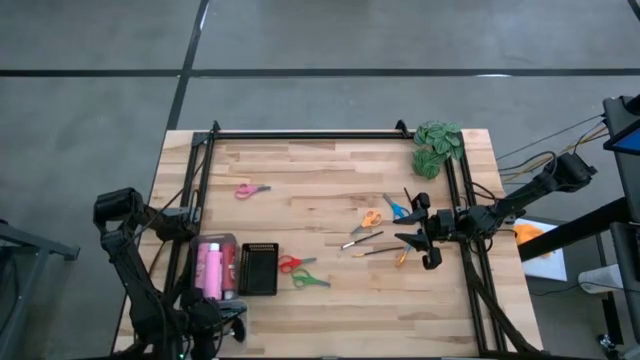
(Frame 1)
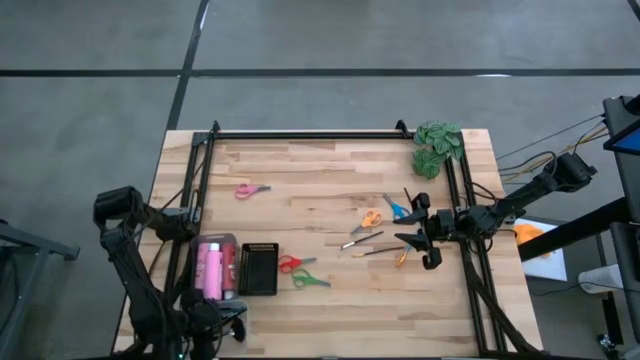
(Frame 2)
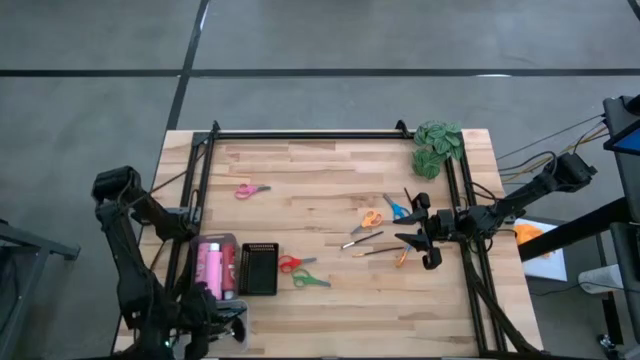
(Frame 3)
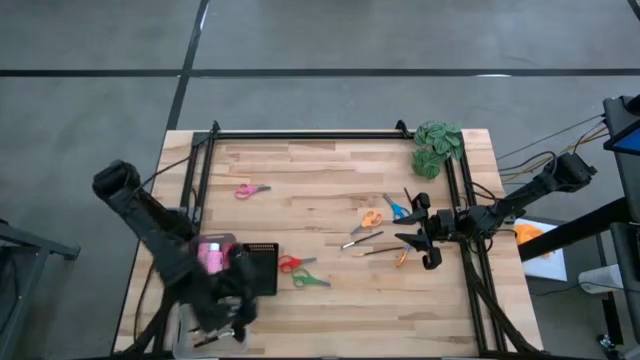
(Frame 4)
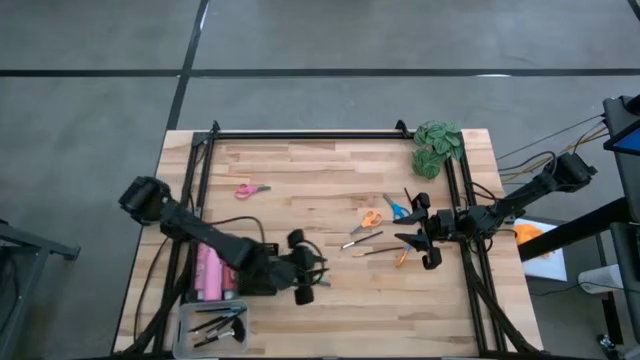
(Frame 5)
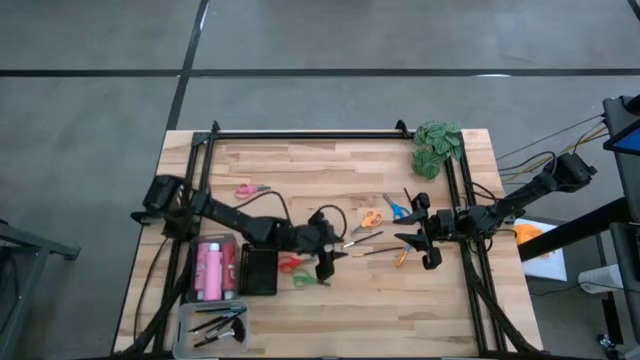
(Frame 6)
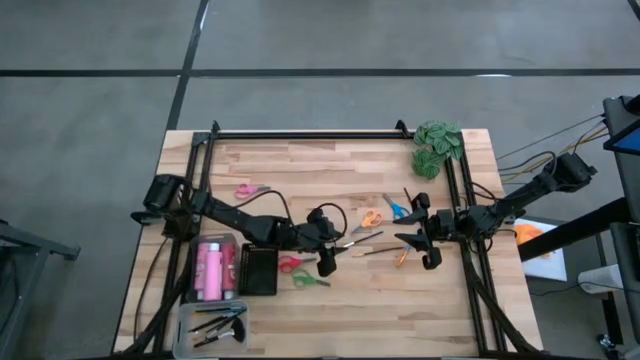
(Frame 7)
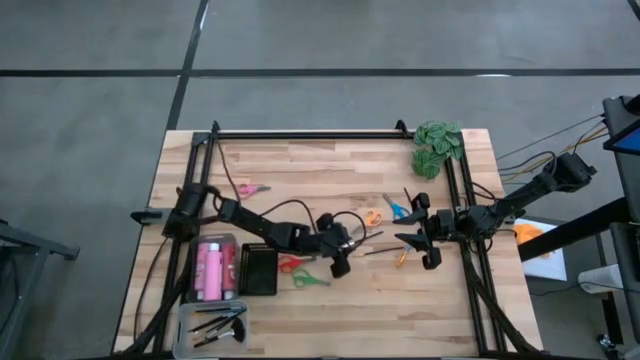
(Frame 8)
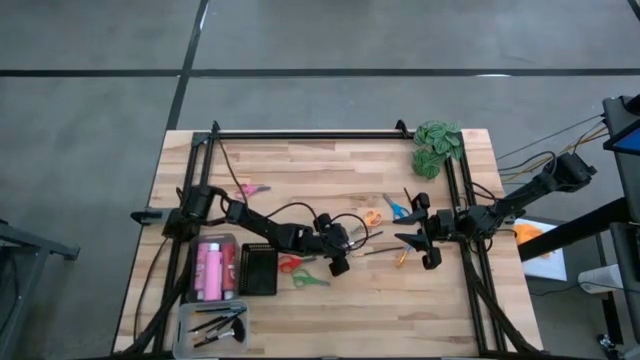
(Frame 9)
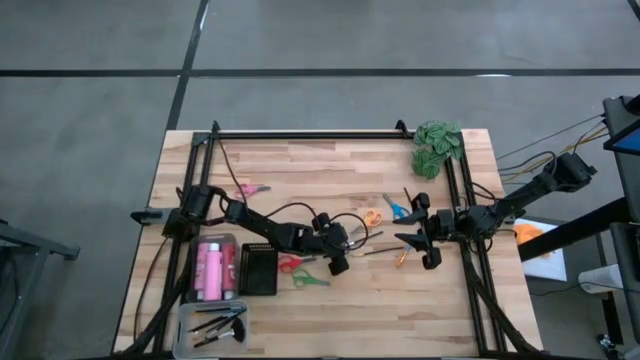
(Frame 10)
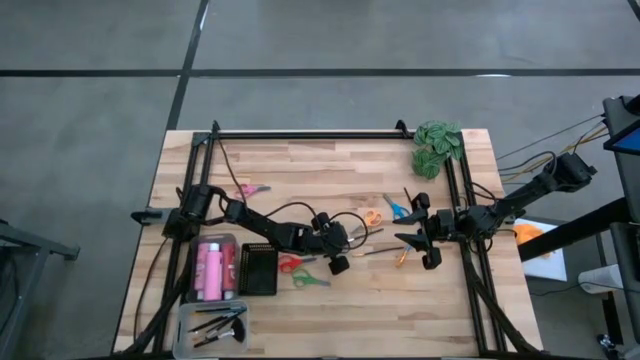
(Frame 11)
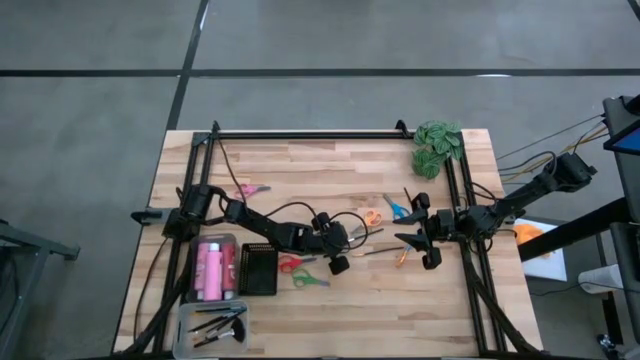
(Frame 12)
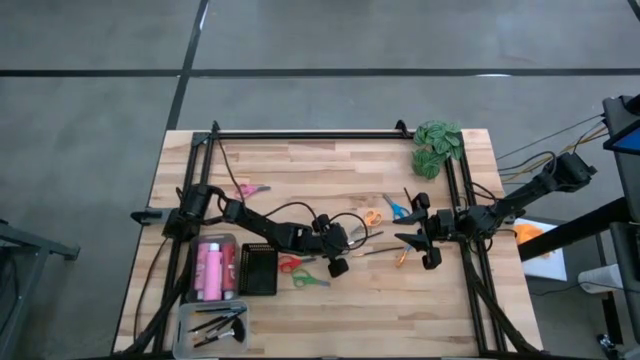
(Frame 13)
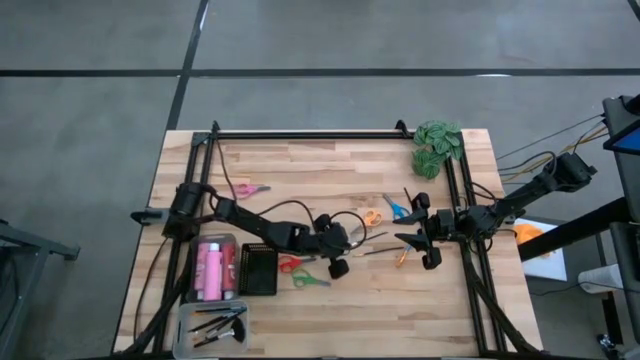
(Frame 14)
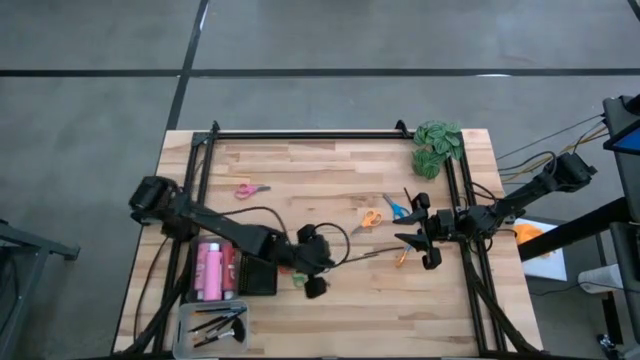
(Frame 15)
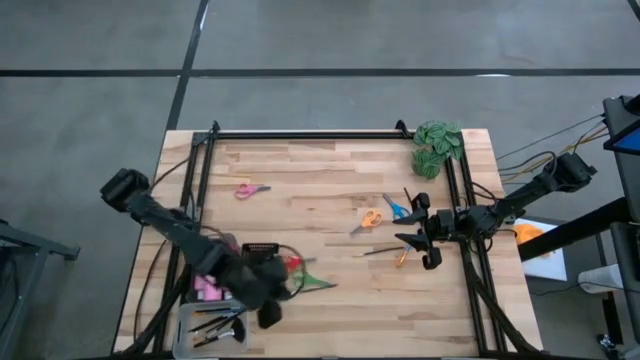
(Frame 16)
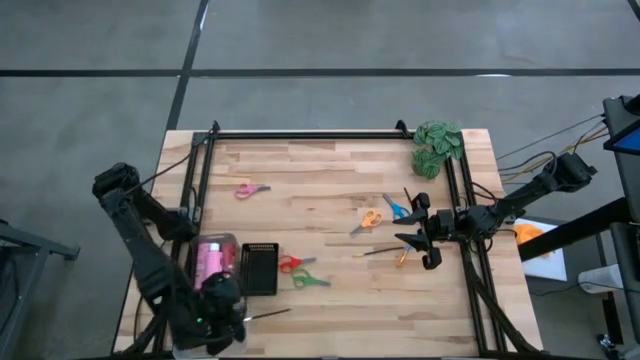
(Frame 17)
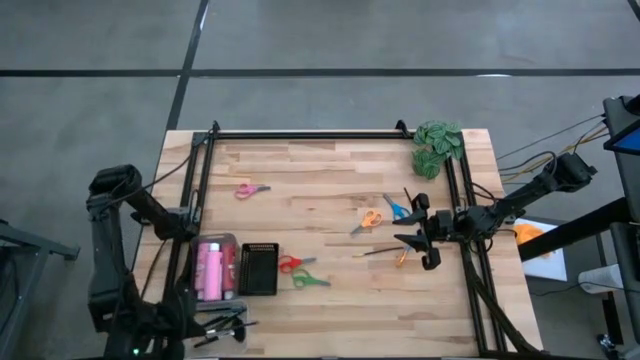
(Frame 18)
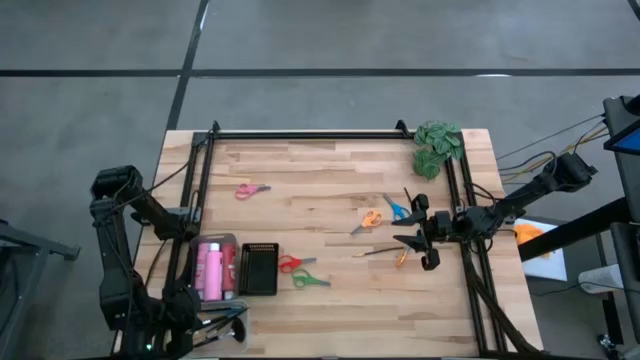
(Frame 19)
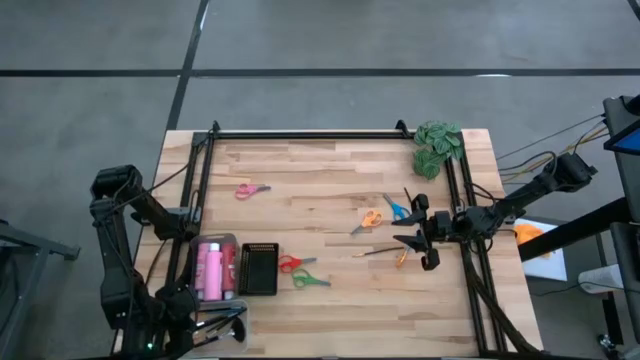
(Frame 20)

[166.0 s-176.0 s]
Task: Pick & Place Paint Supplies
Put the silver paint brush into the transparent bin

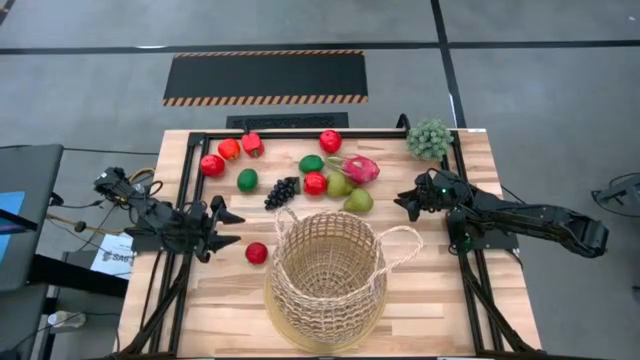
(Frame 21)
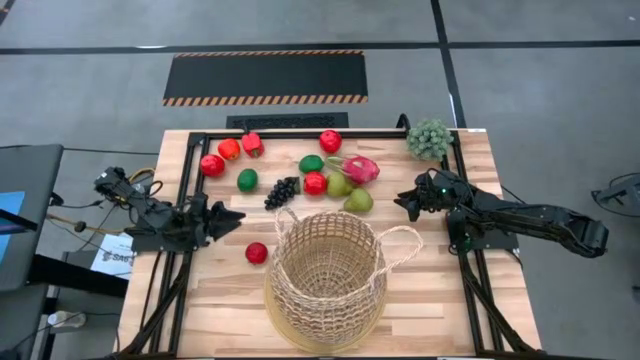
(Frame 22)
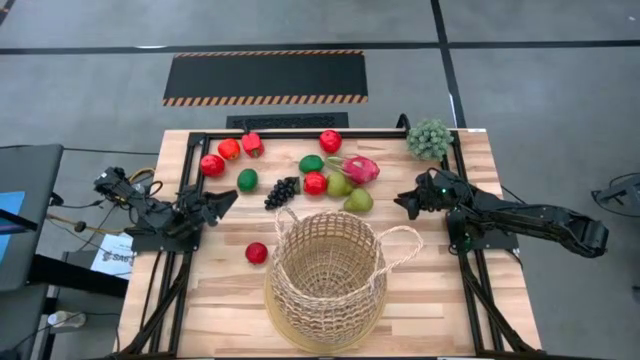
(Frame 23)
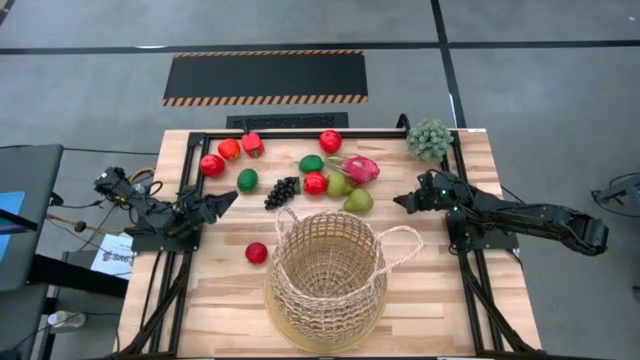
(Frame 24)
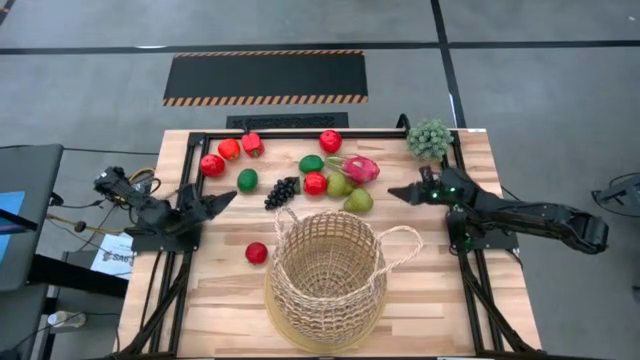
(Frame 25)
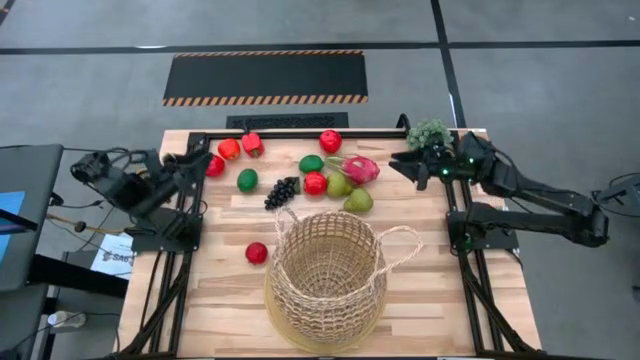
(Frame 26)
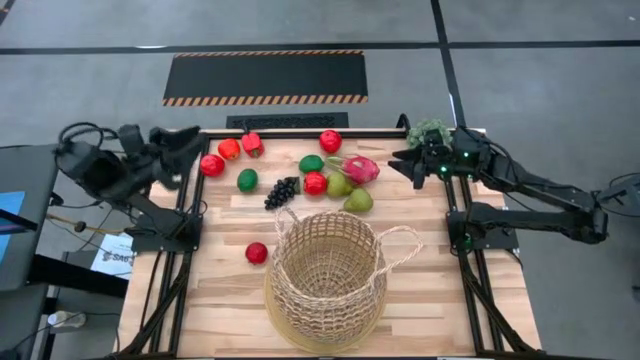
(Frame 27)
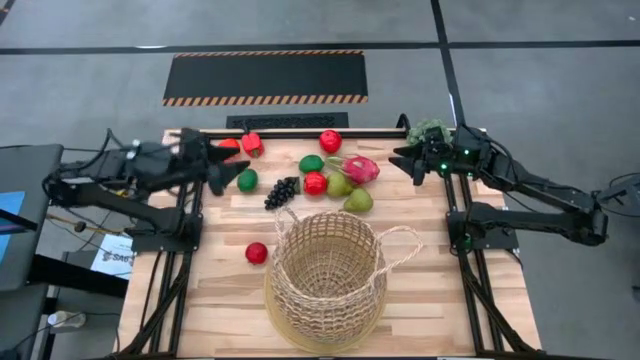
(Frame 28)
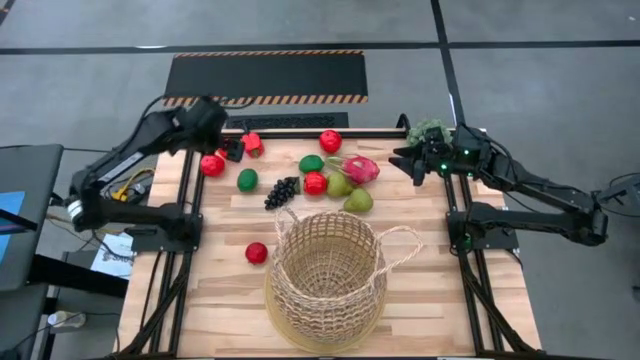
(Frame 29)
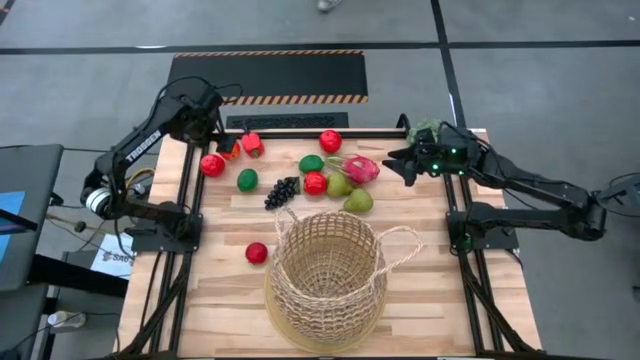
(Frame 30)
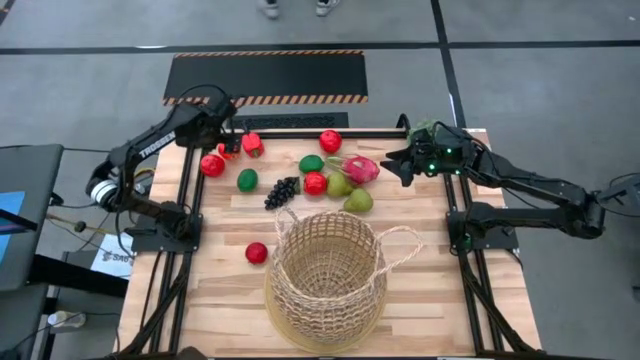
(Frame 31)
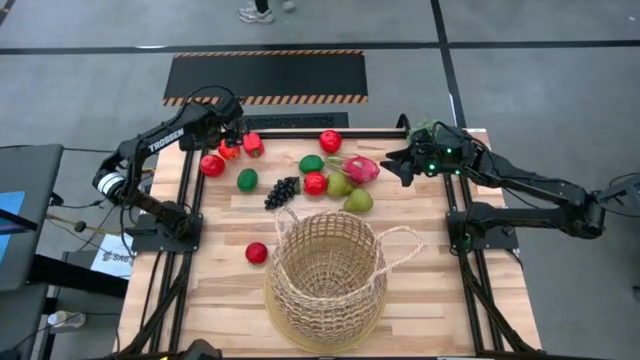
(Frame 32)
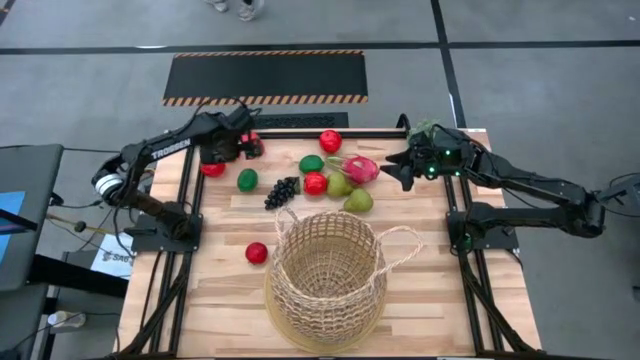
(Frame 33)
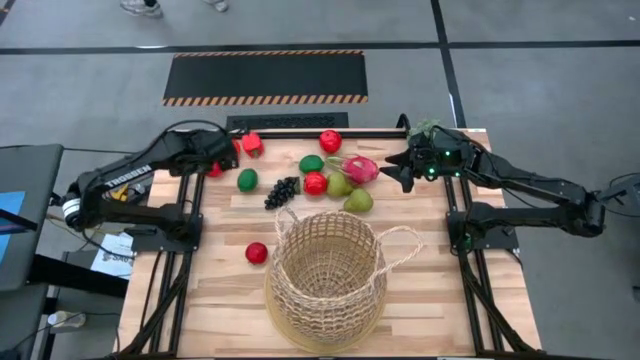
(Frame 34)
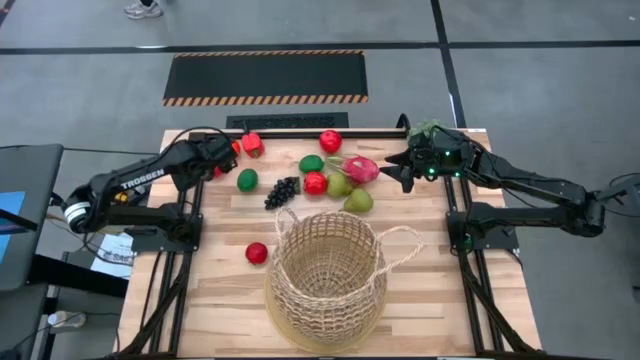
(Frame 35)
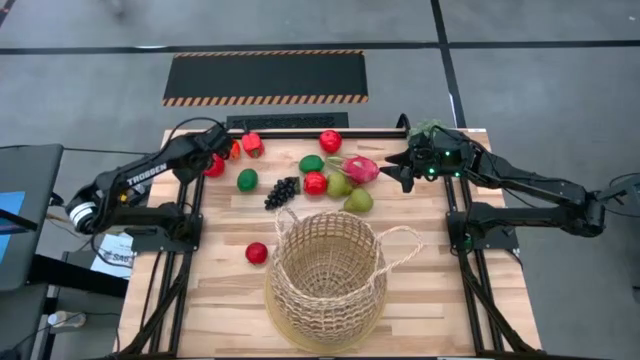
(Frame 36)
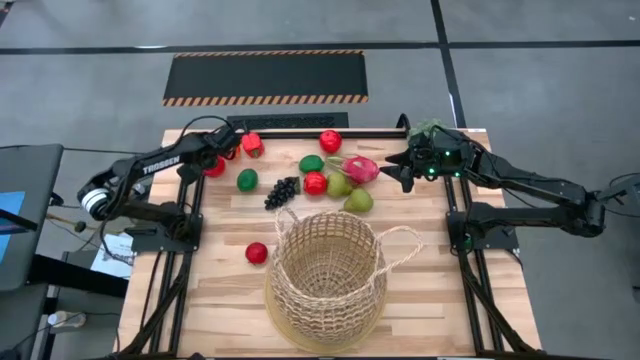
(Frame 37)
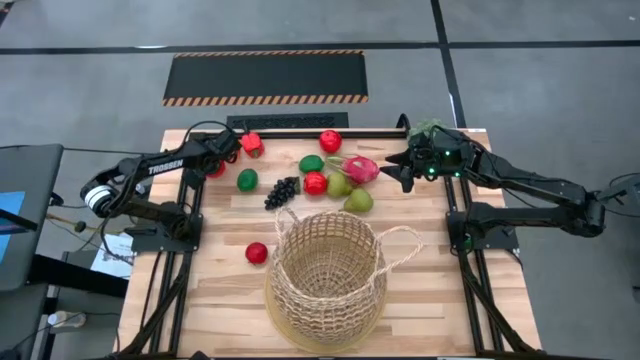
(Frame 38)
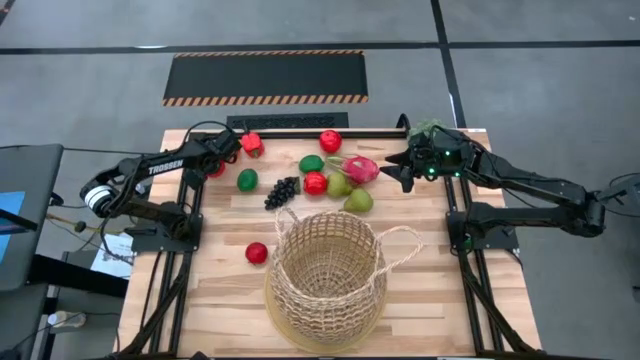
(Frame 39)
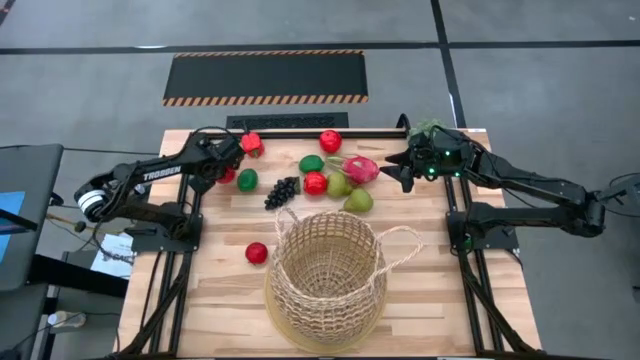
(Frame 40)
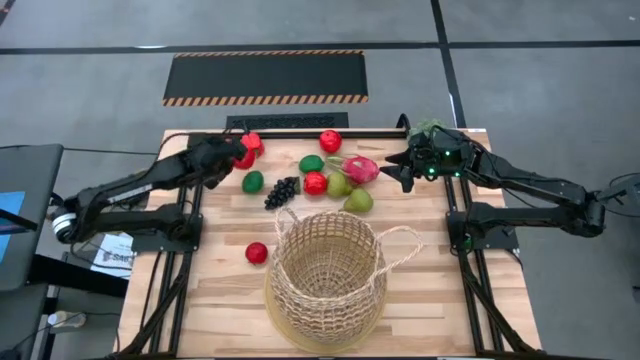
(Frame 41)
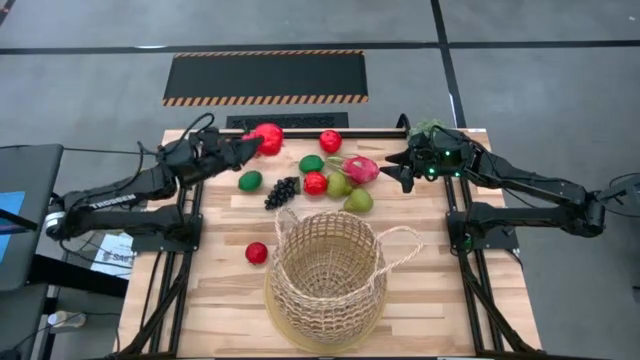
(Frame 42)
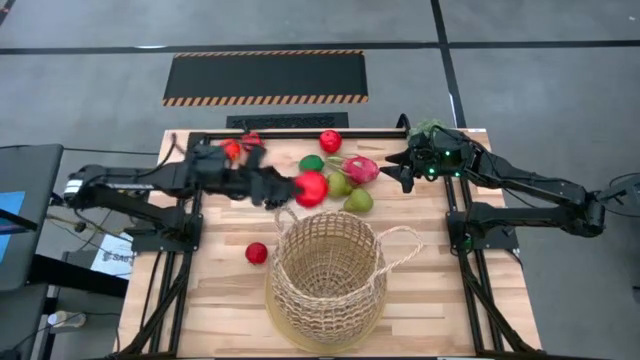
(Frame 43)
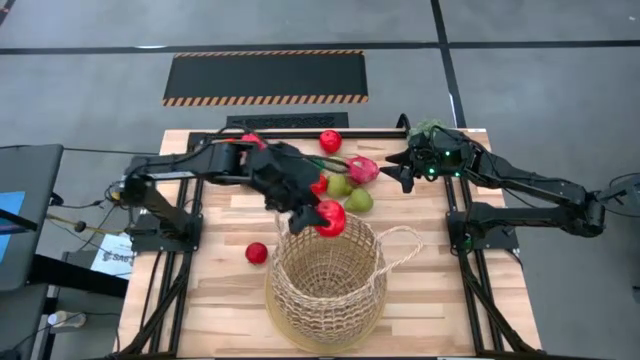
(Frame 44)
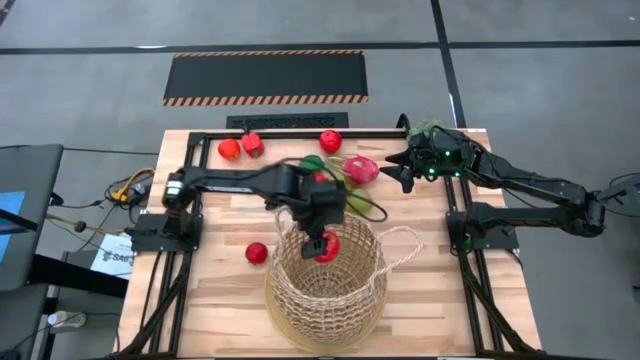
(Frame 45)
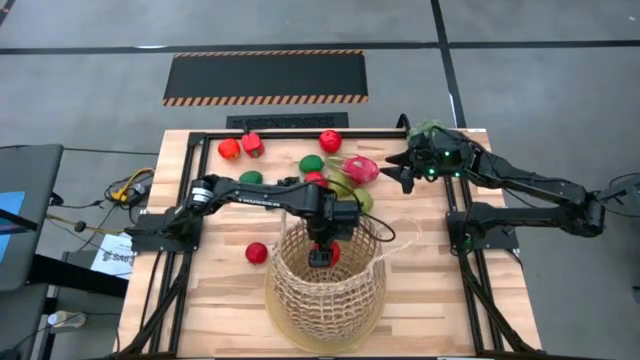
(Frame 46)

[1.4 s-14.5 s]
Task: Build produce basket
Put the apple into the basket
